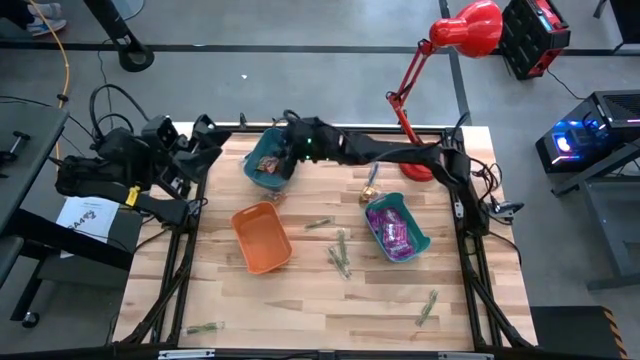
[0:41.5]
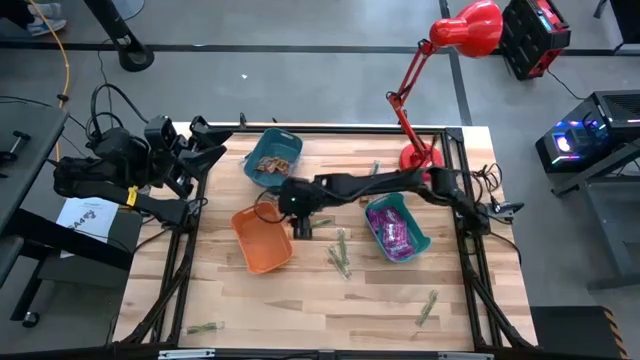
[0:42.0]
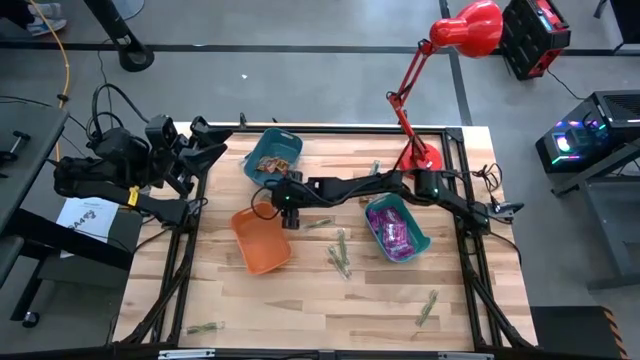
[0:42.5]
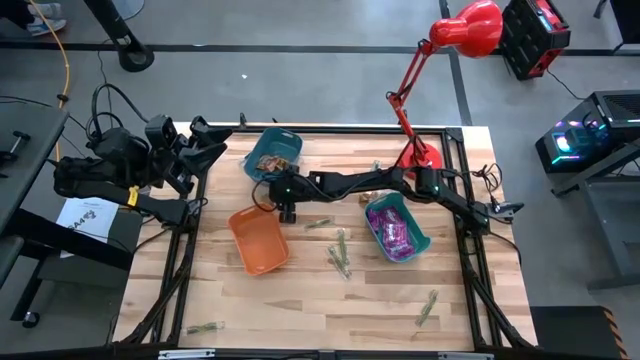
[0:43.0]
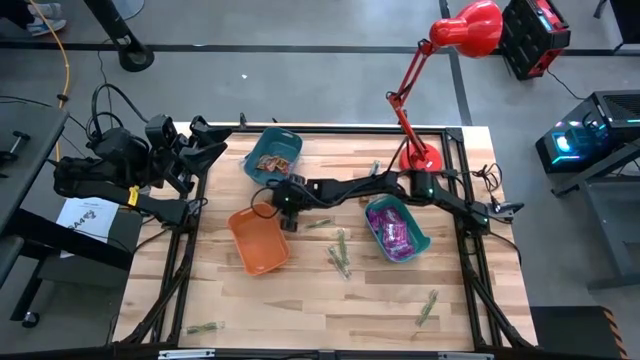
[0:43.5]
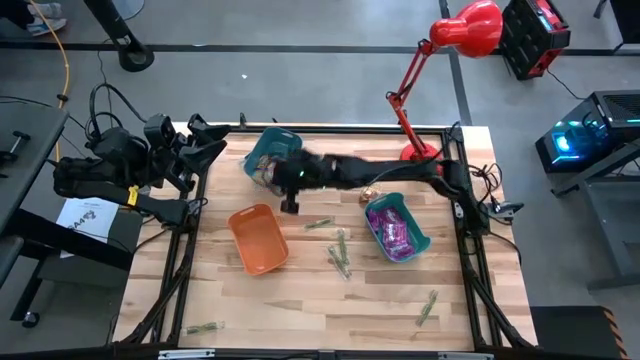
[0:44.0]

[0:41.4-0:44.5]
Task: Sort candy
Put the gold gummy into the blue bin

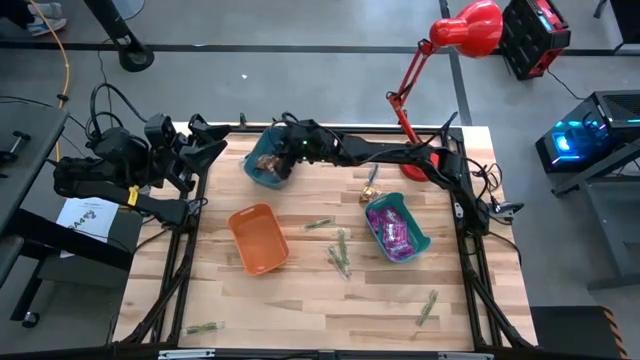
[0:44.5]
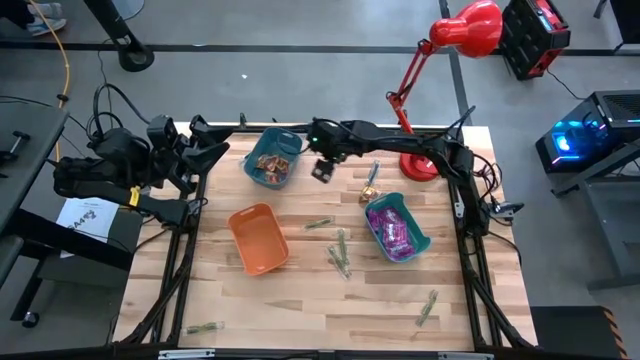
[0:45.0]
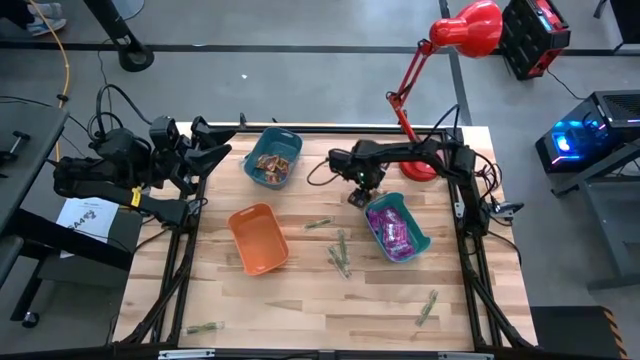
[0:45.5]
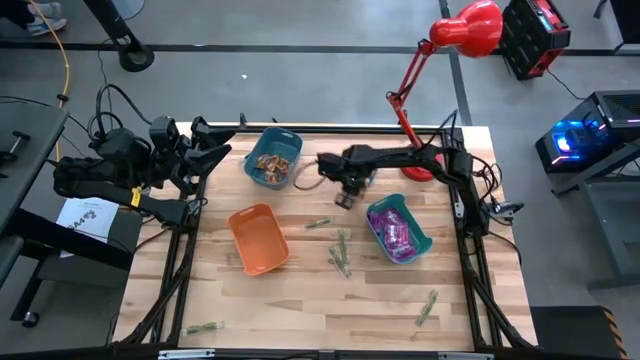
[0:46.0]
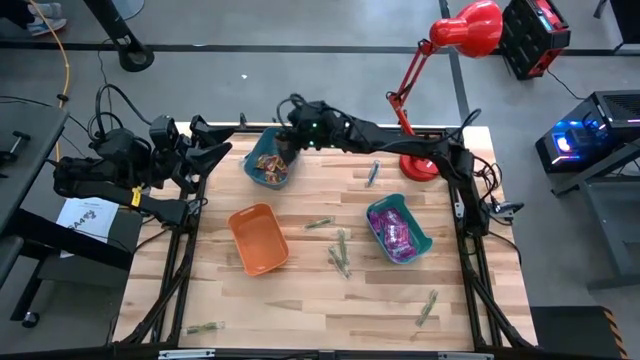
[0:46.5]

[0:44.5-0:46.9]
Put the gold gummy into the blue bin

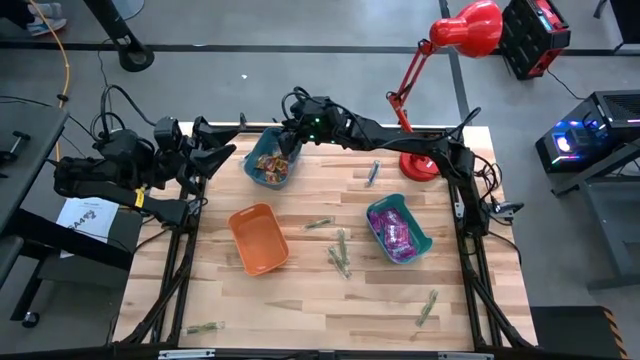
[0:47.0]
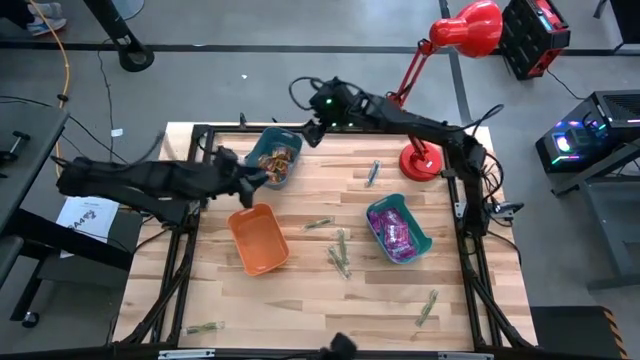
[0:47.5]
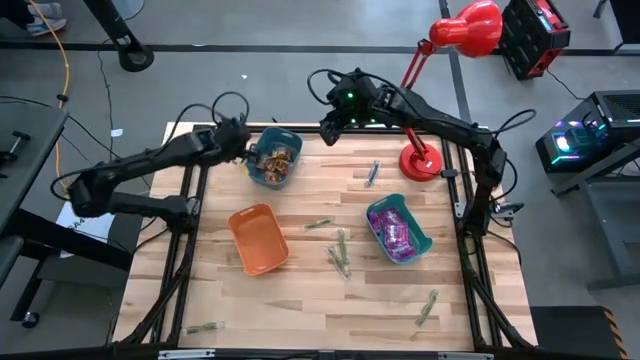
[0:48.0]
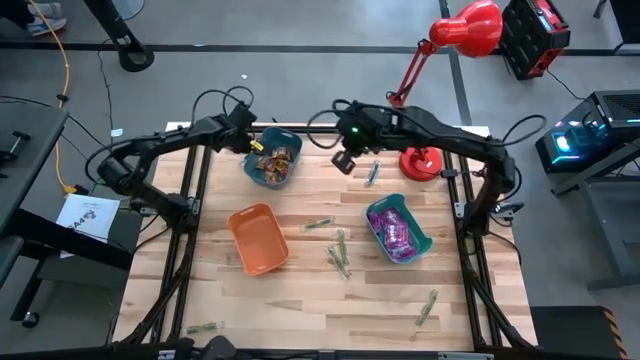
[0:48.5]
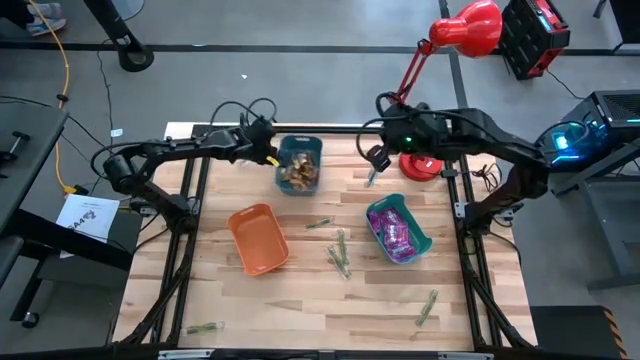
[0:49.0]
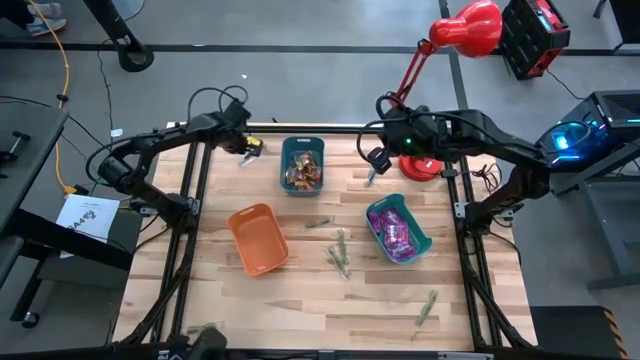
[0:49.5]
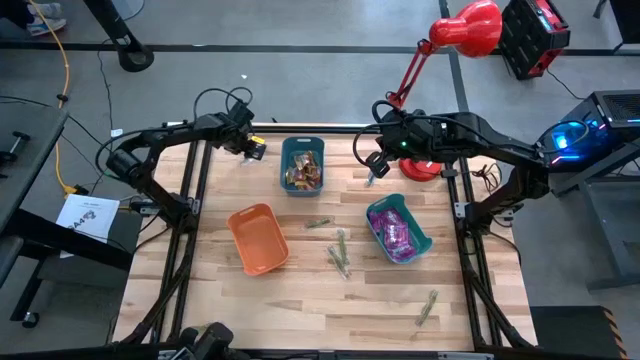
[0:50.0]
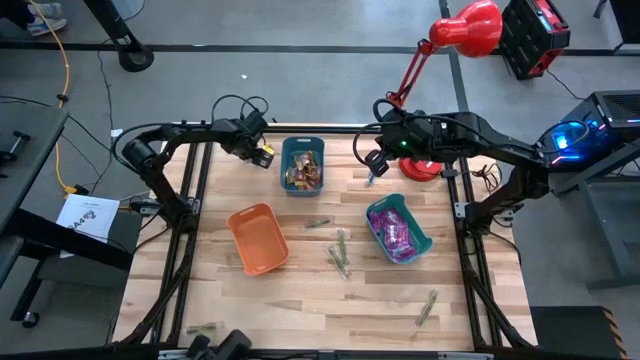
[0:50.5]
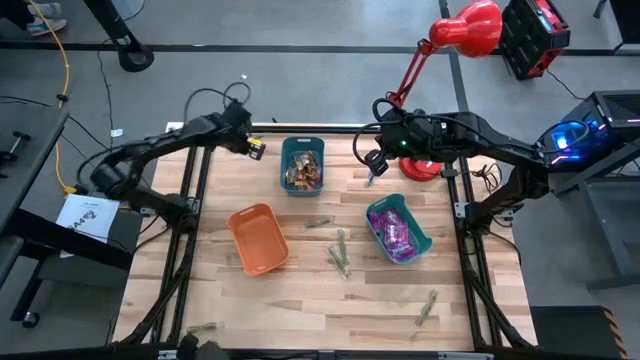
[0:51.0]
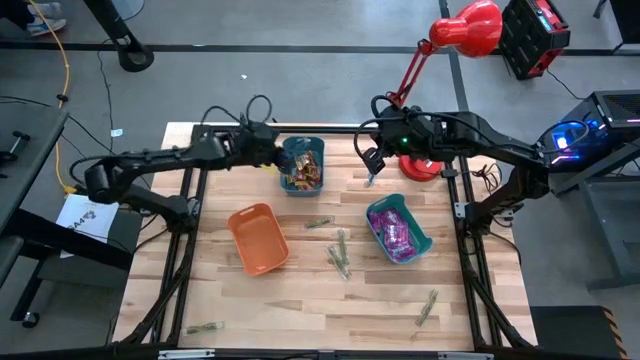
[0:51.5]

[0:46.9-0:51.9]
Put the blue candy into the orange bin

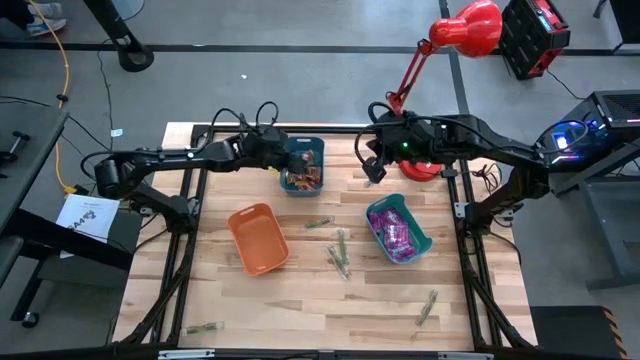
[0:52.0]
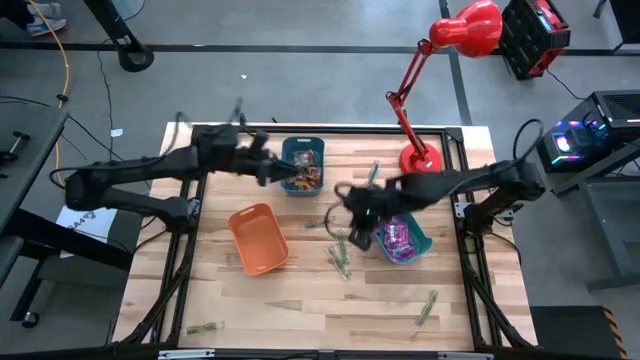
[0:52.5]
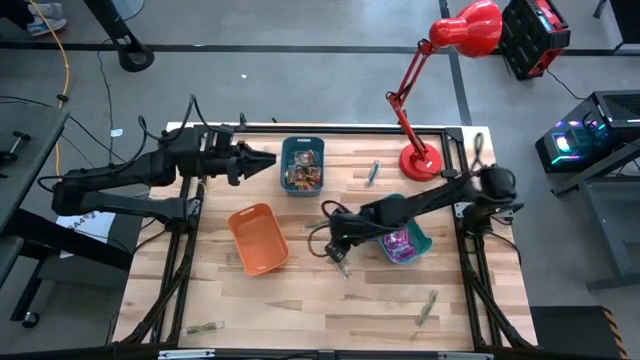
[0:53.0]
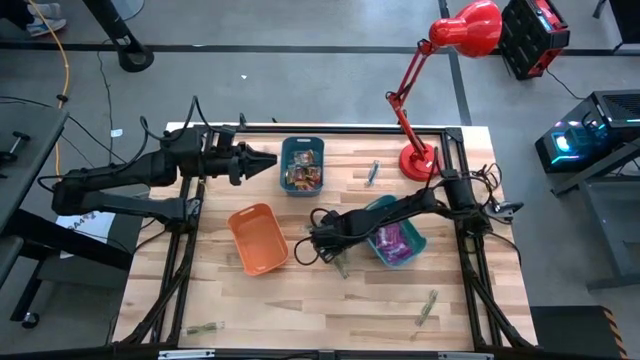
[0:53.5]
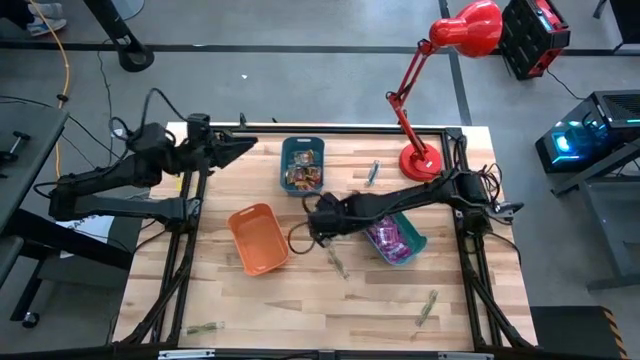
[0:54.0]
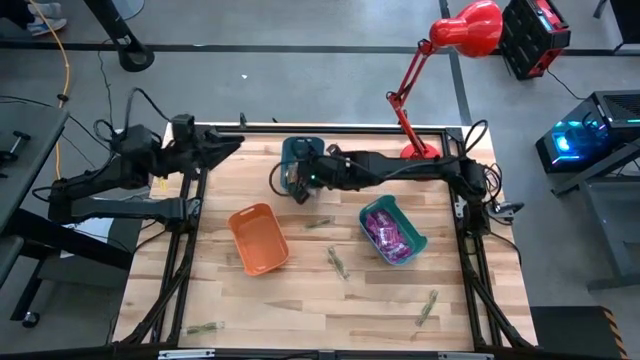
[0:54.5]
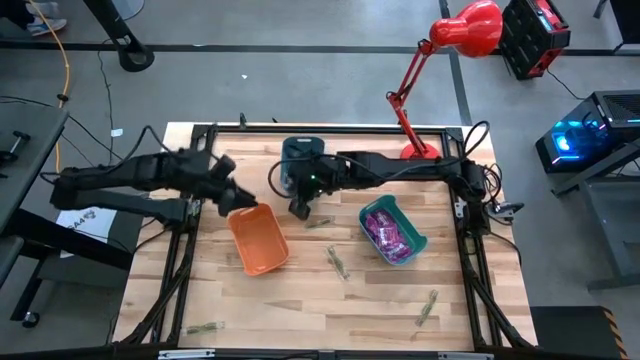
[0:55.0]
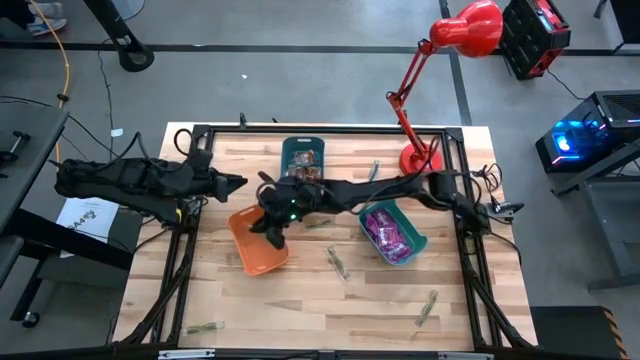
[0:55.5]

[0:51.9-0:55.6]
Put the green candy into the orange bin

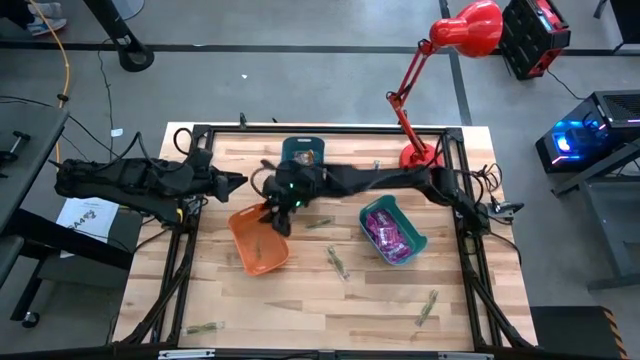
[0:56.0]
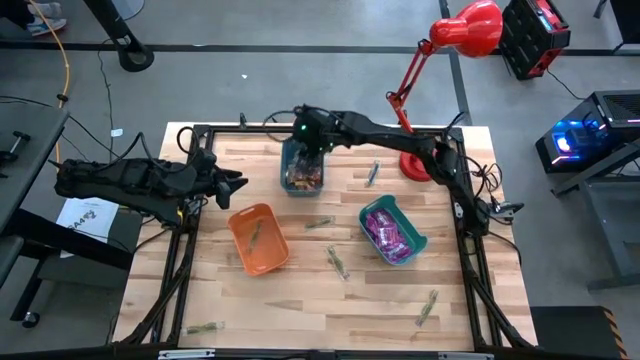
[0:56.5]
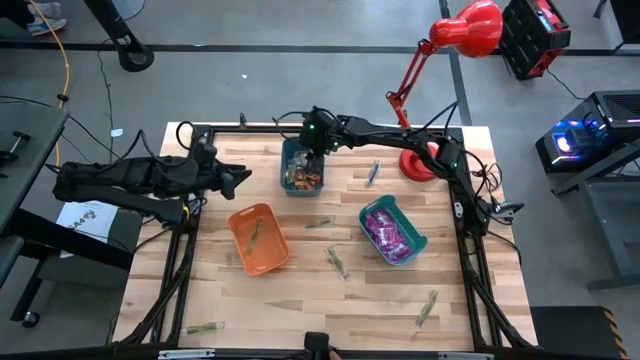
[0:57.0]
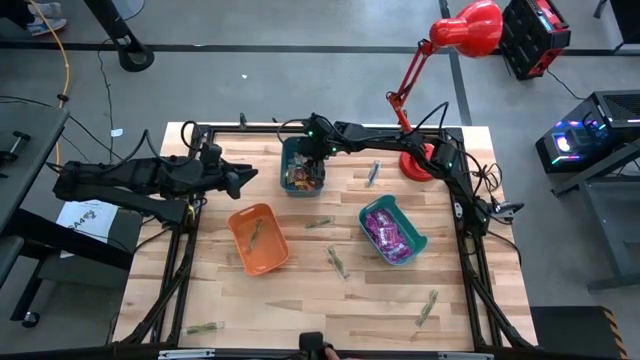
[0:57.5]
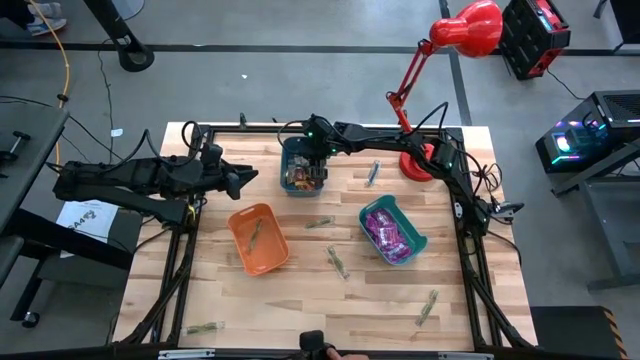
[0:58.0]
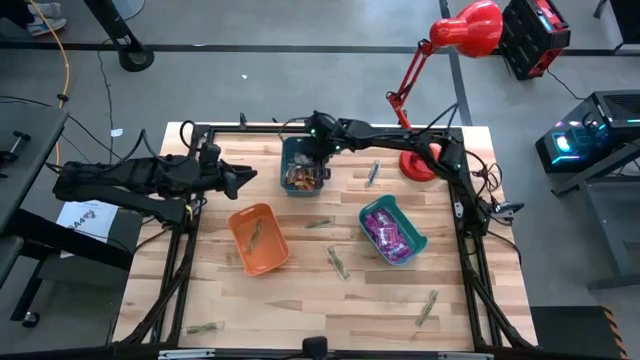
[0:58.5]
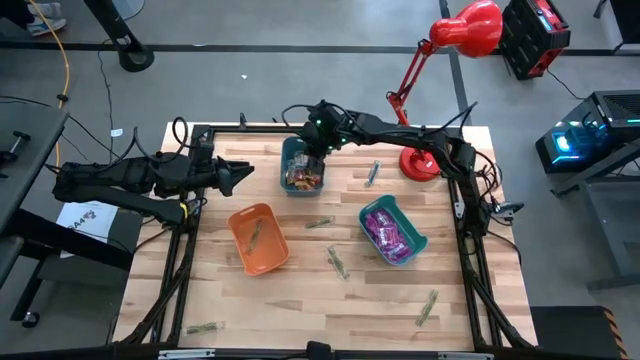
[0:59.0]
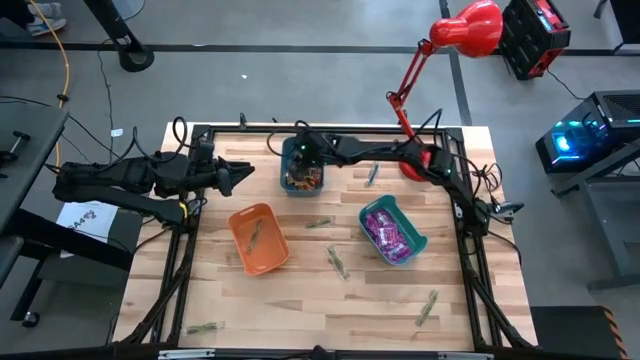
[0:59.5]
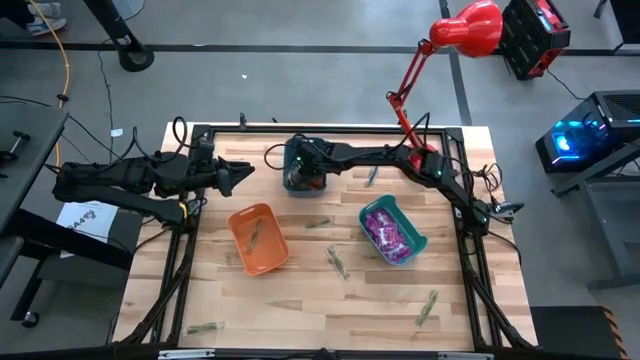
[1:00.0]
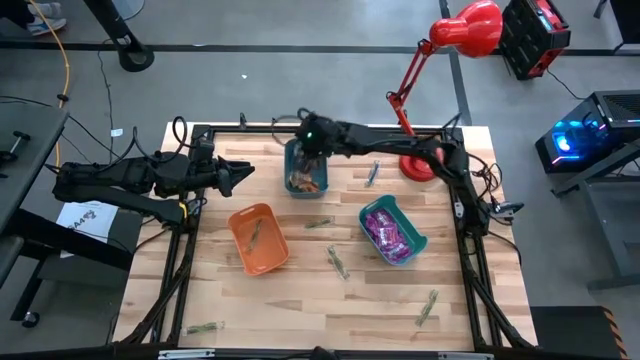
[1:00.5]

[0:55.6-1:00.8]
Put the blue candy into the orange bin

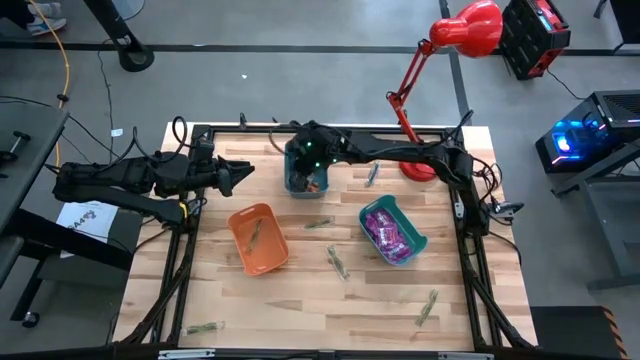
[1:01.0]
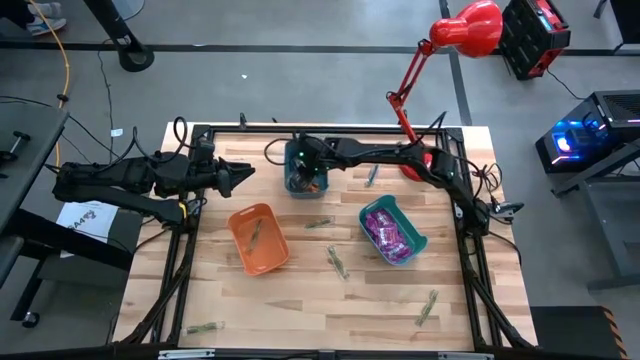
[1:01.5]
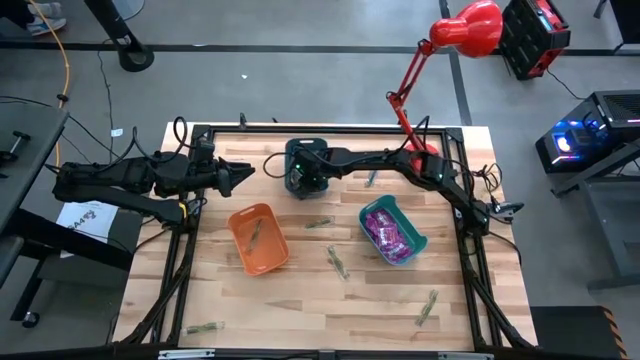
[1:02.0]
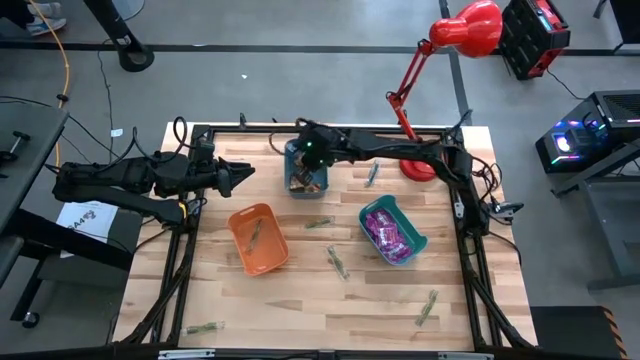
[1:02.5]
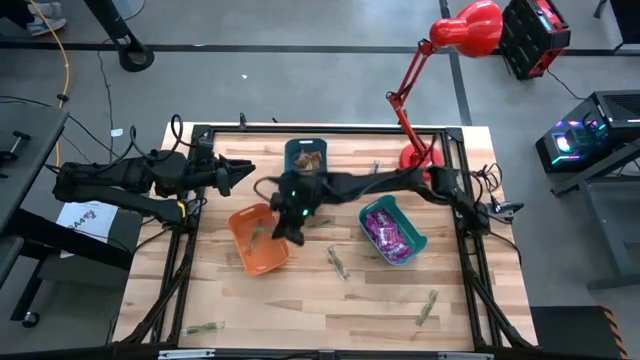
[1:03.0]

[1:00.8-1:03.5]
Put the blue candy into the orange bin
